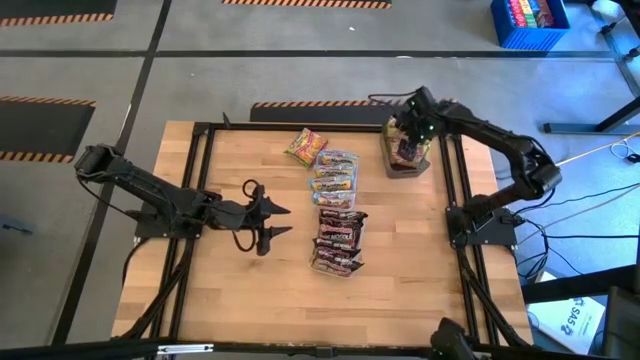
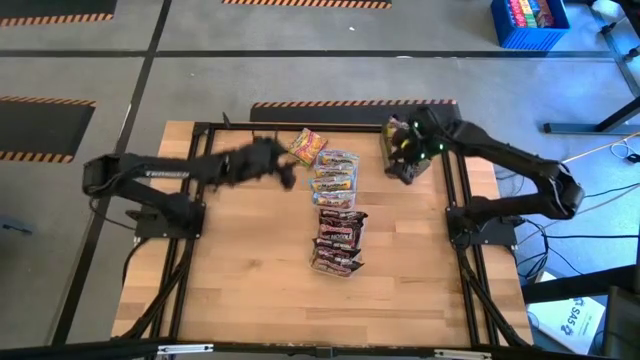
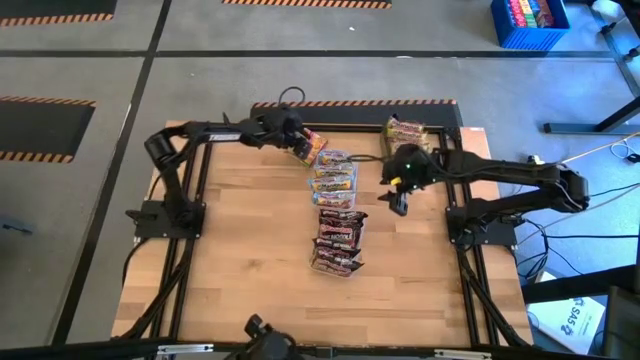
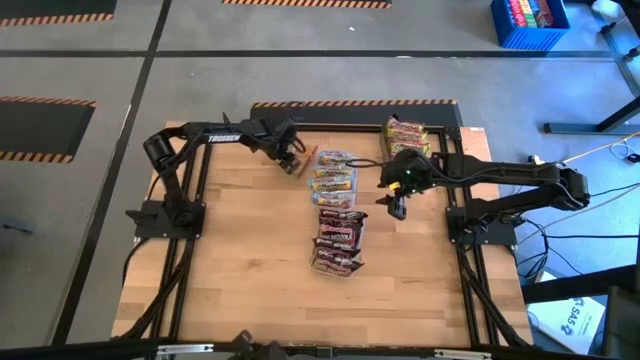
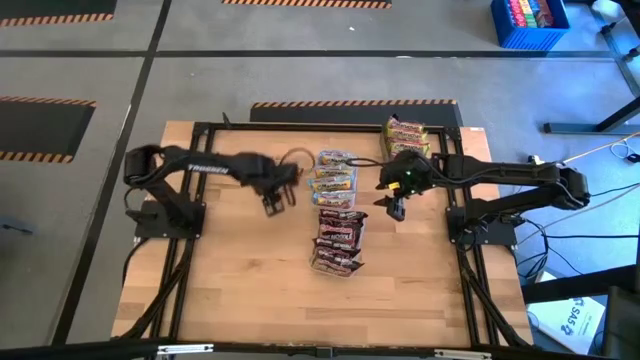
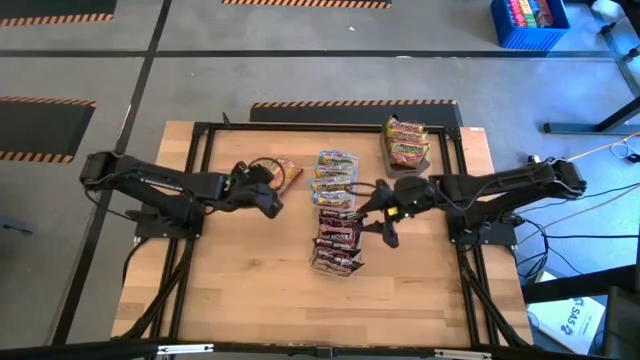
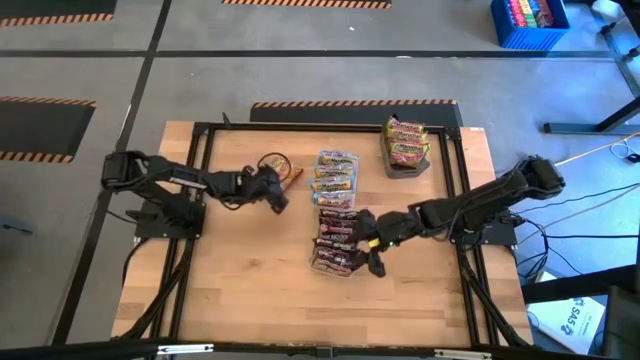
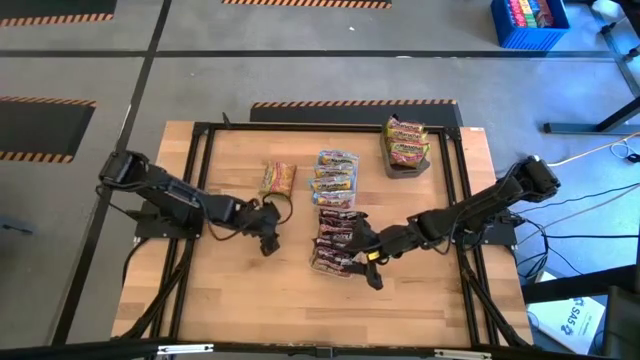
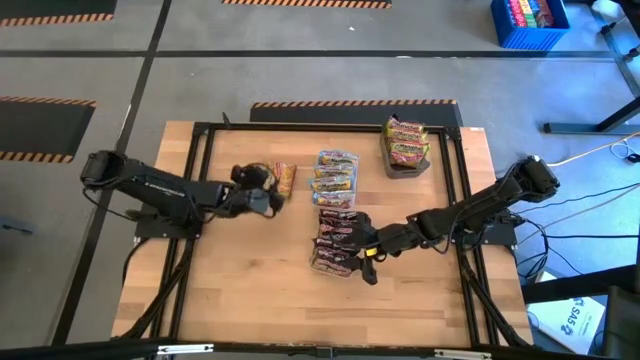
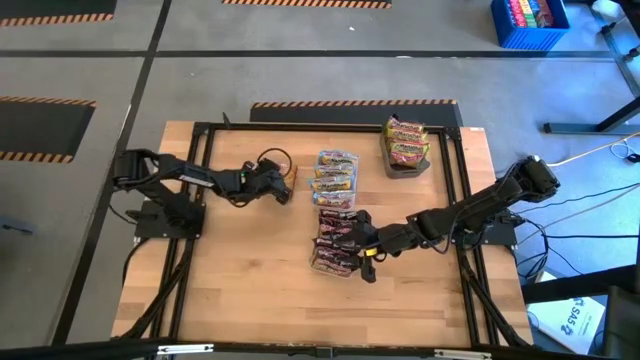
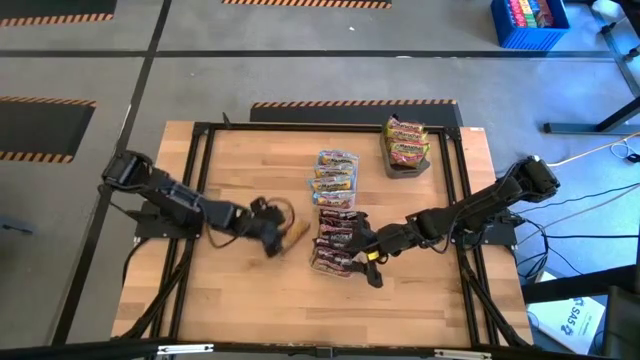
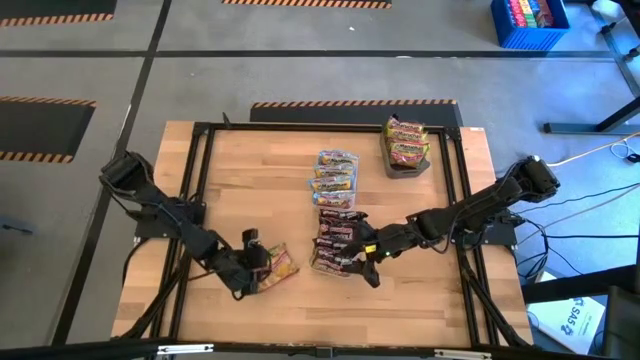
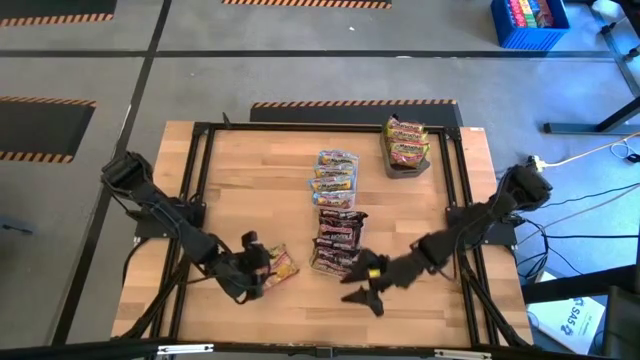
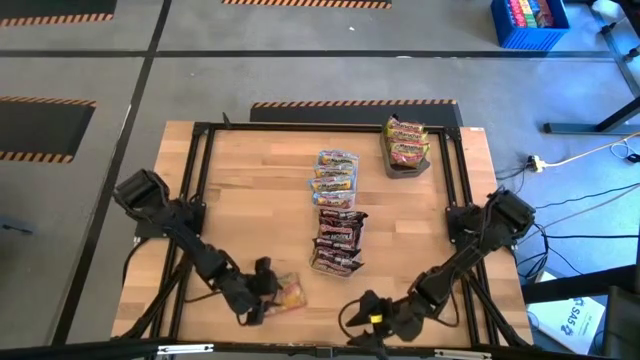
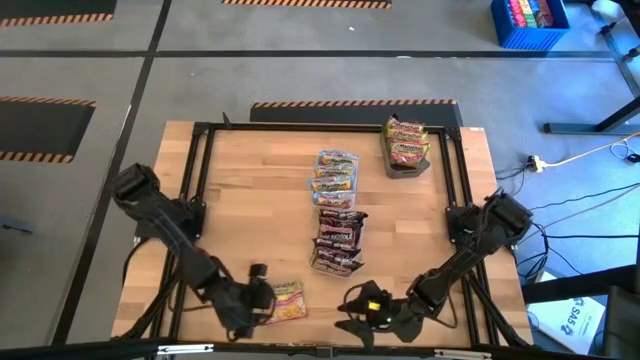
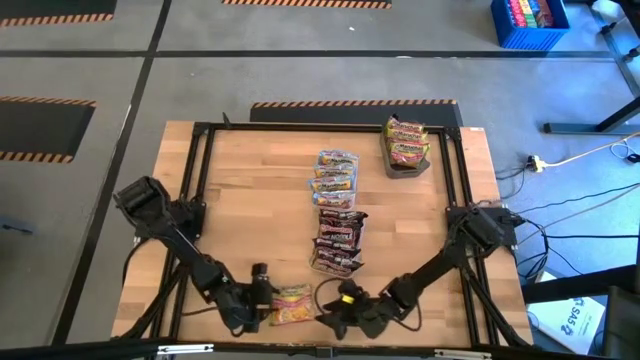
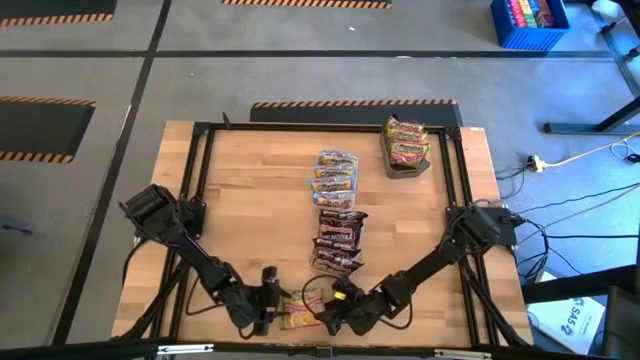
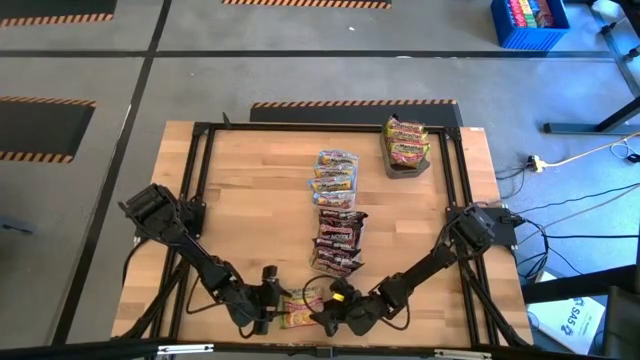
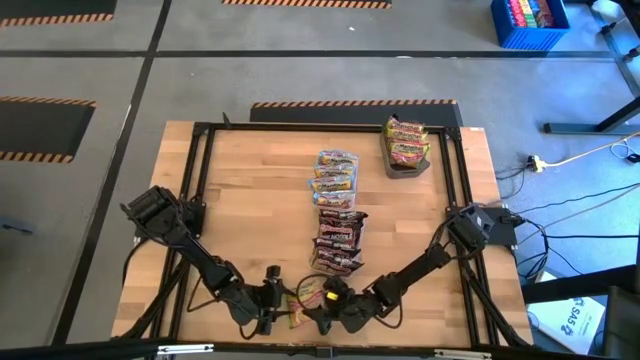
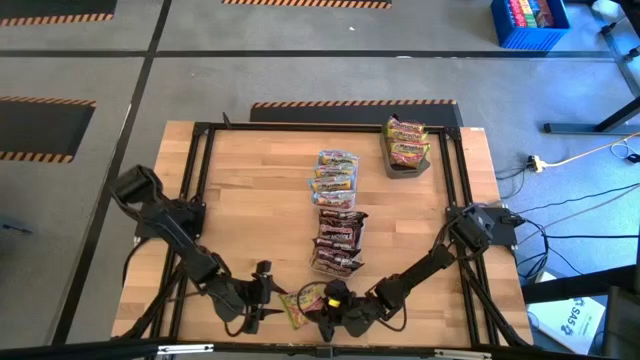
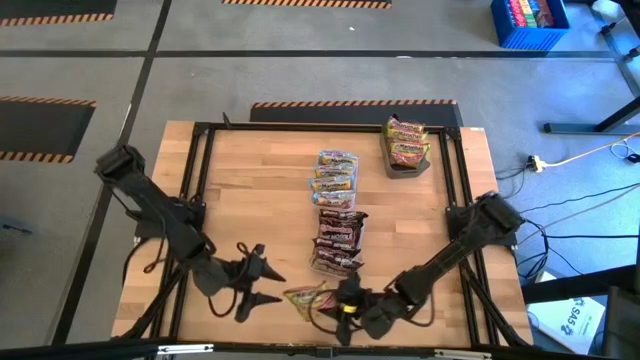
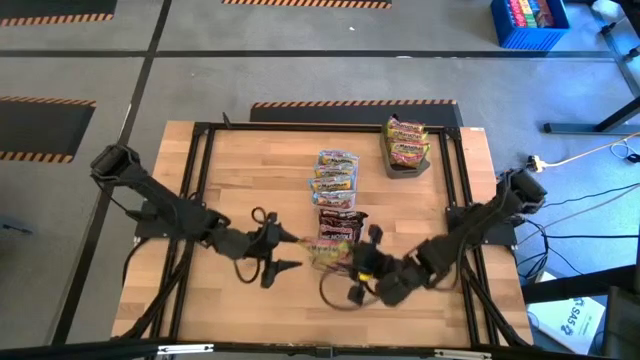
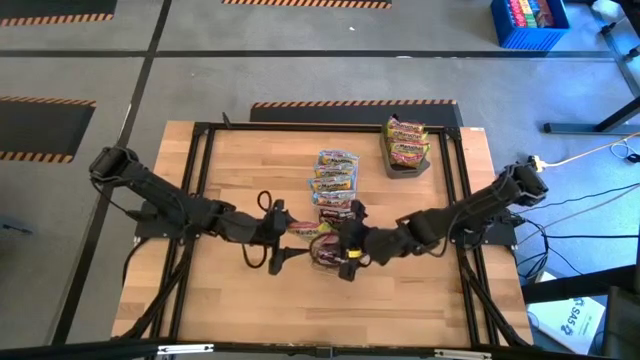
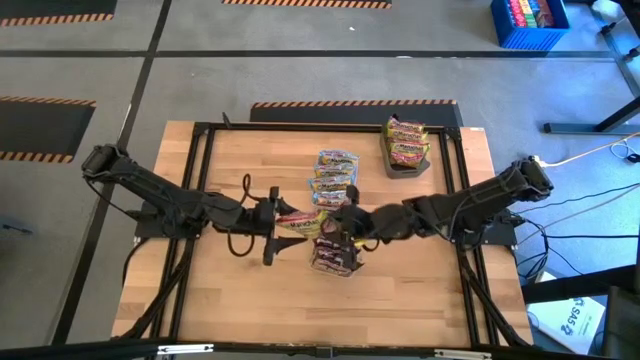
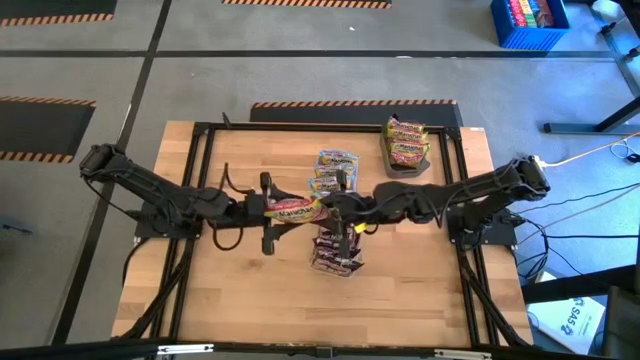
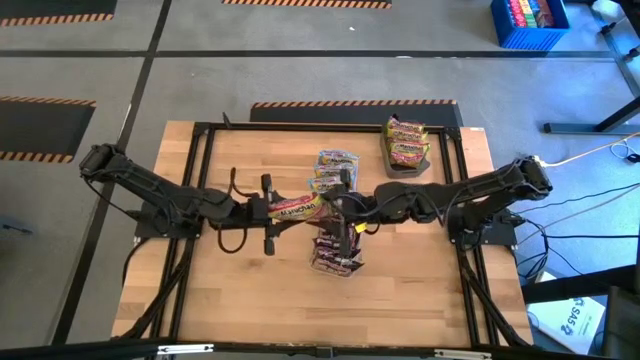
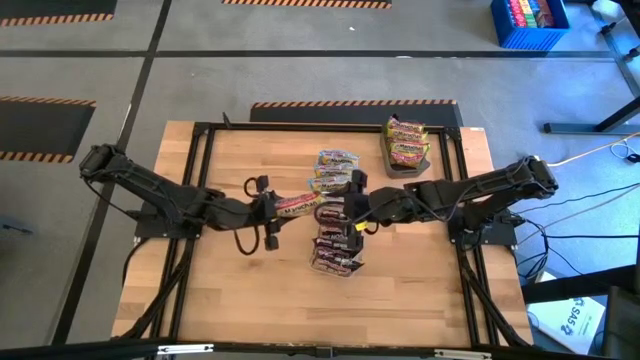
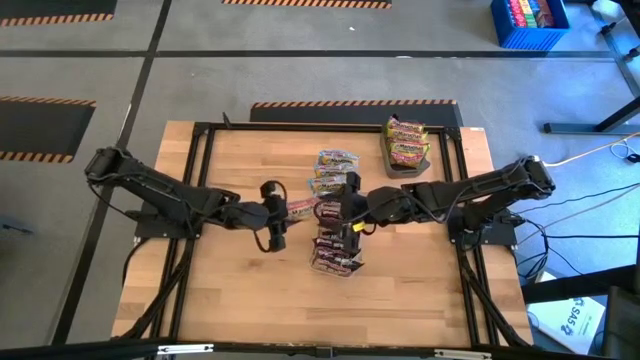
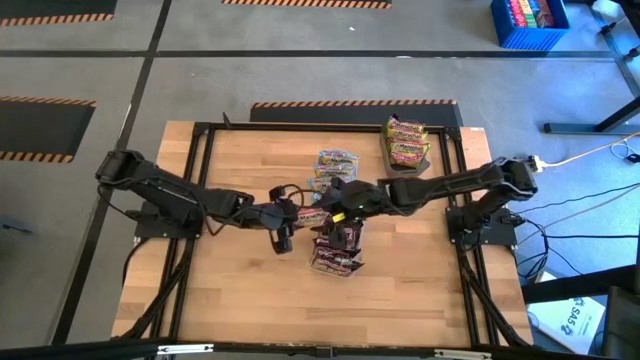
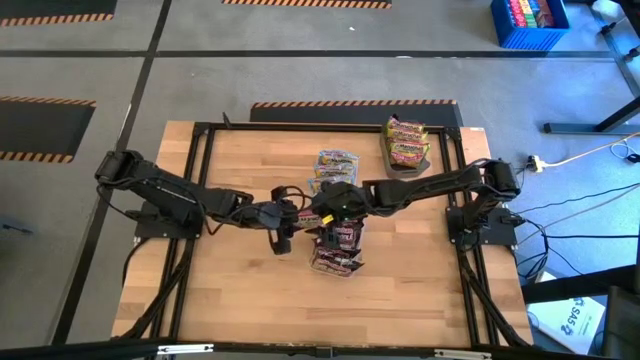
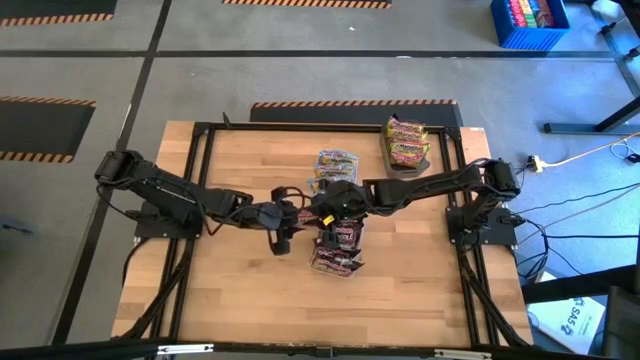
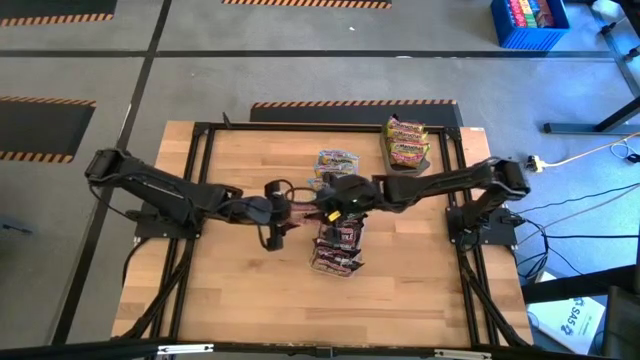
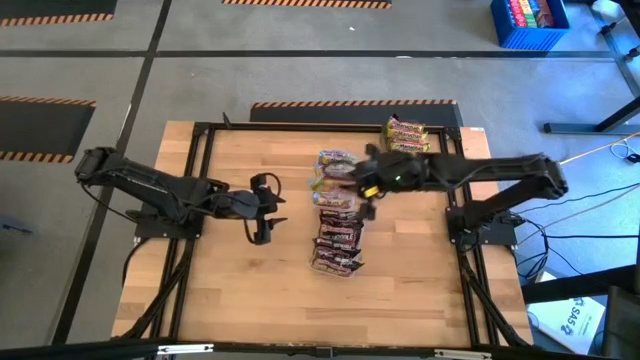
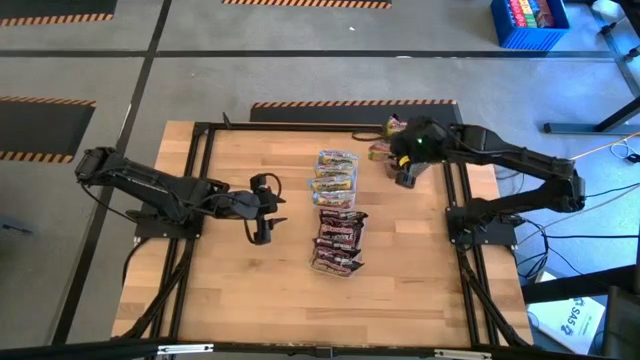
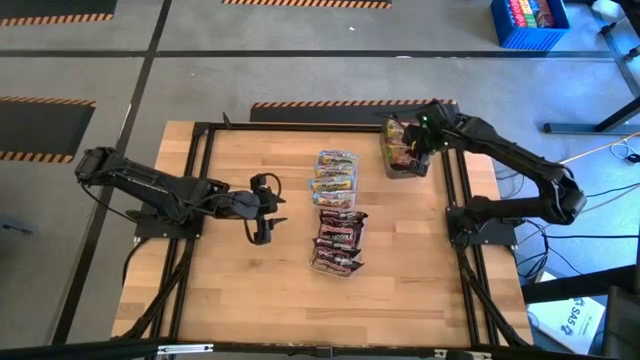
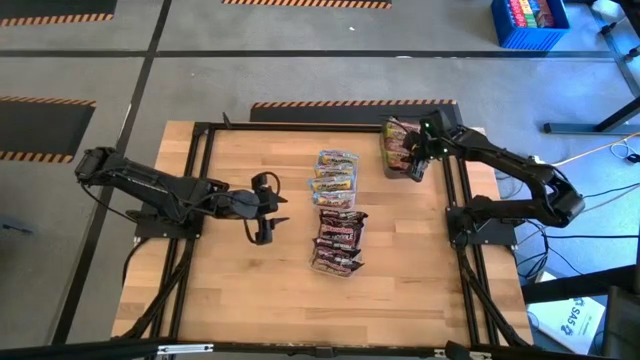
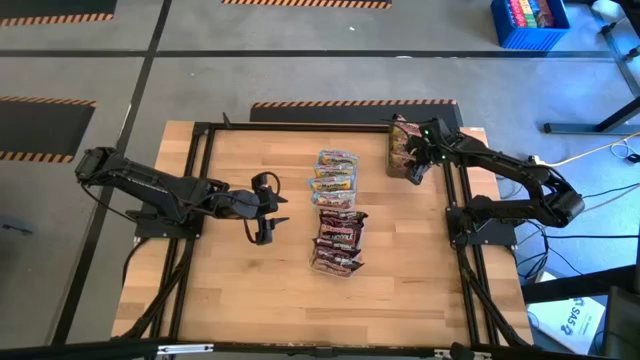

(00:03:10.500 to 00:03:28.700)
Task: Sort Maruchan noodles
Put the green noodle pack into the black bin

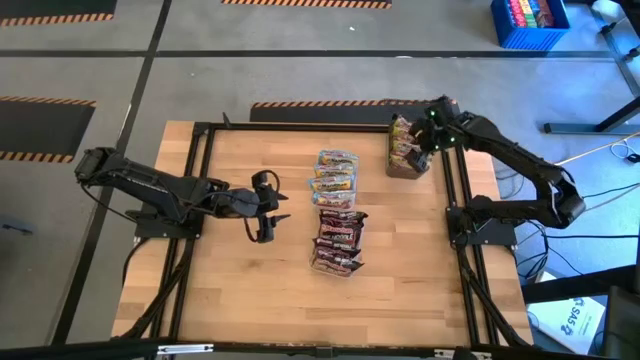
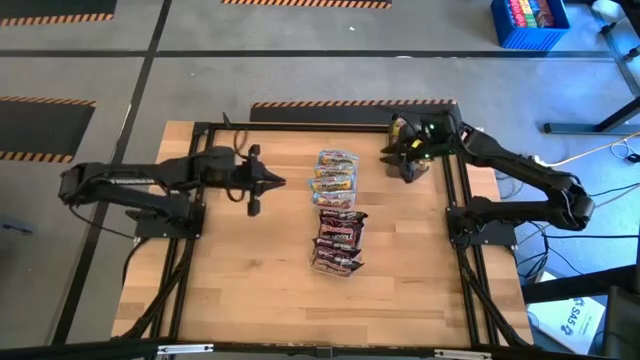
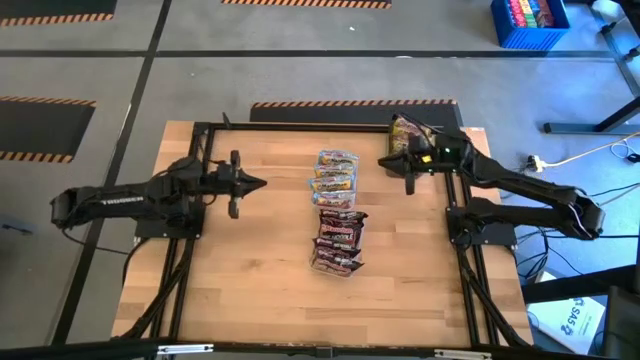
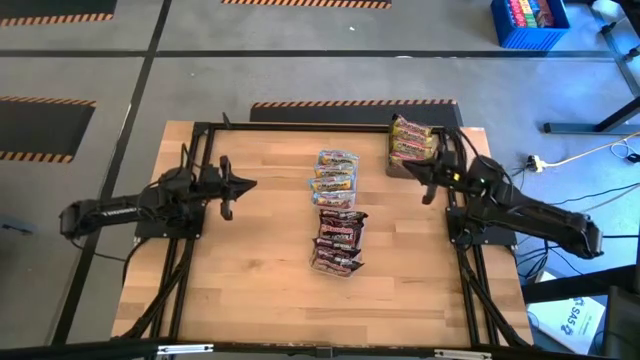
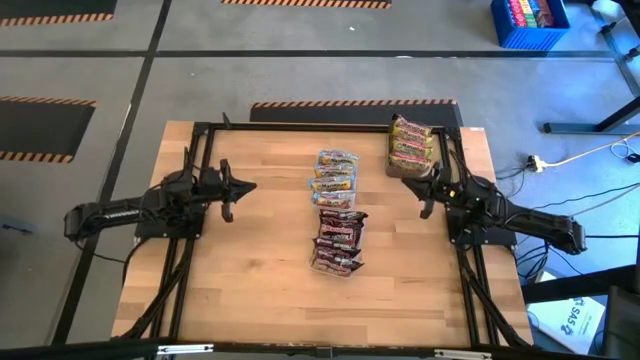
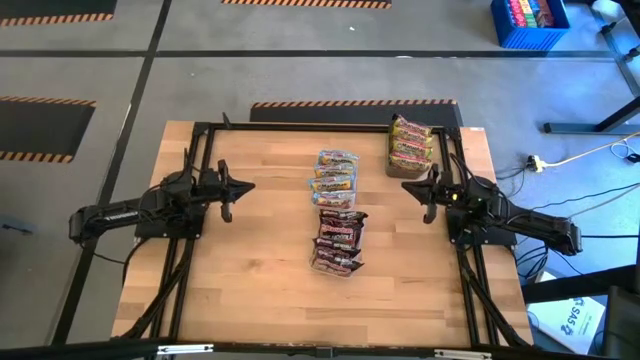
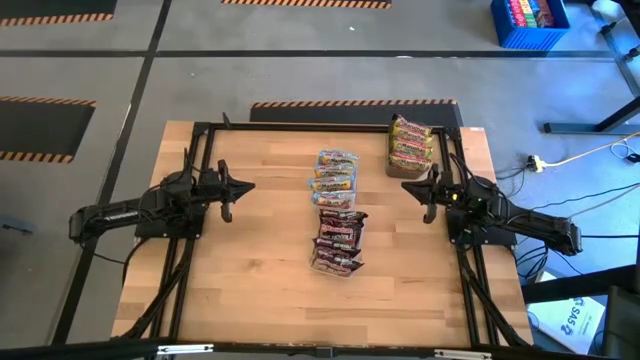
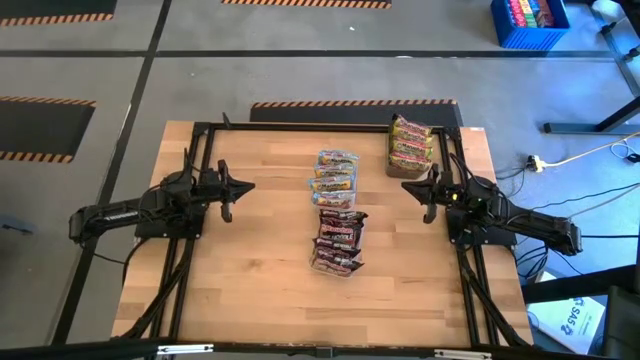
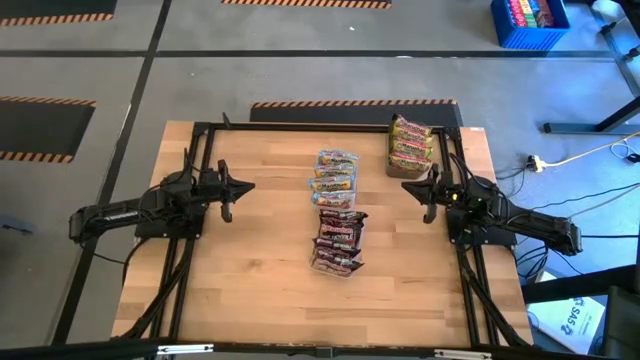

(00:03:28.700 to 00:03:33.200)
Return to Home Position
